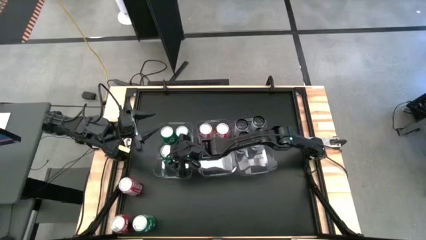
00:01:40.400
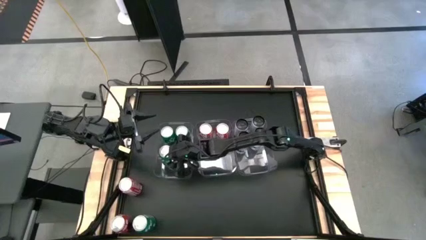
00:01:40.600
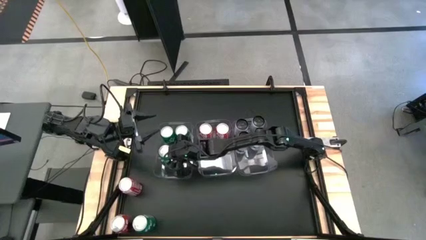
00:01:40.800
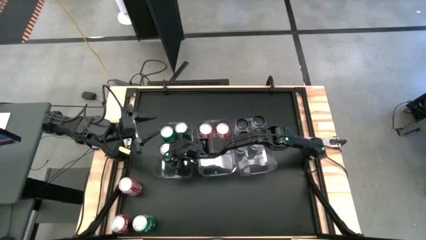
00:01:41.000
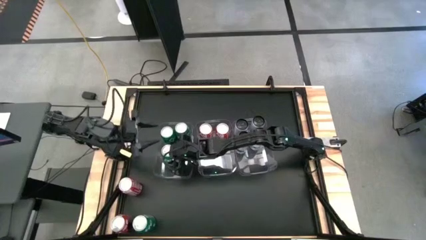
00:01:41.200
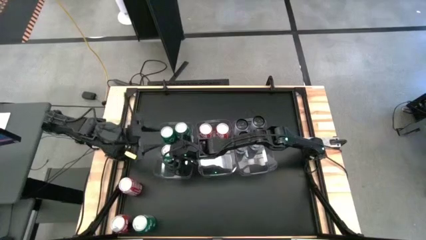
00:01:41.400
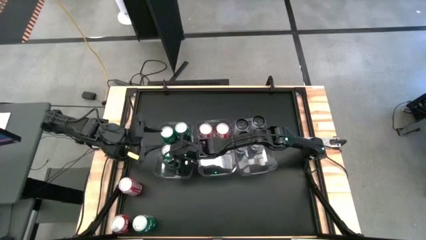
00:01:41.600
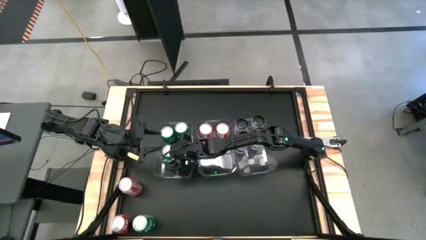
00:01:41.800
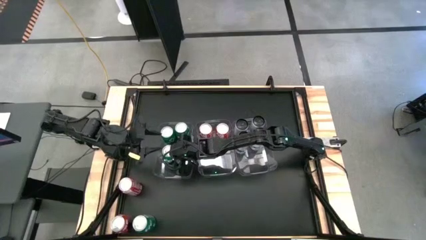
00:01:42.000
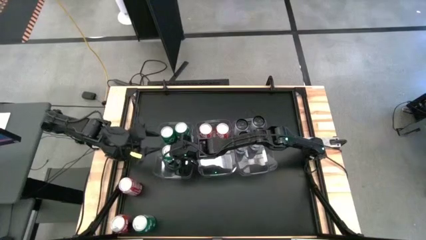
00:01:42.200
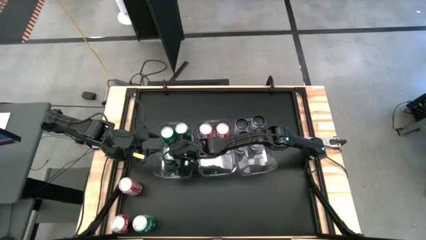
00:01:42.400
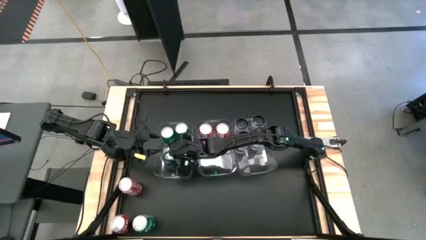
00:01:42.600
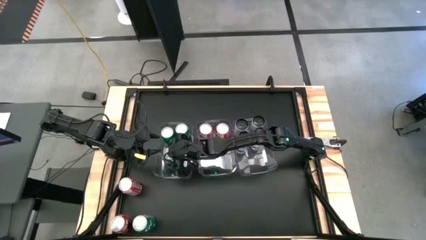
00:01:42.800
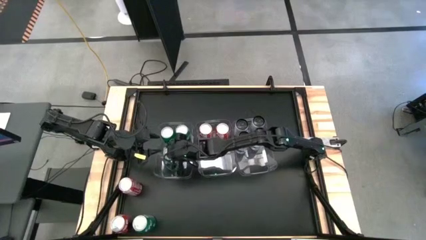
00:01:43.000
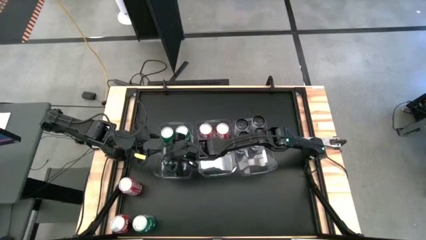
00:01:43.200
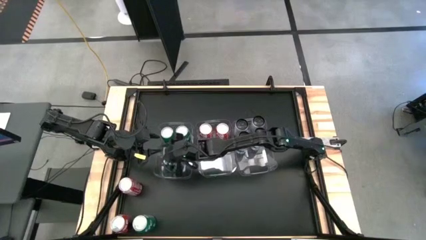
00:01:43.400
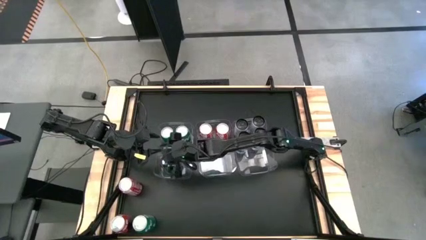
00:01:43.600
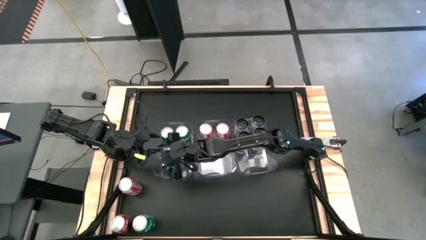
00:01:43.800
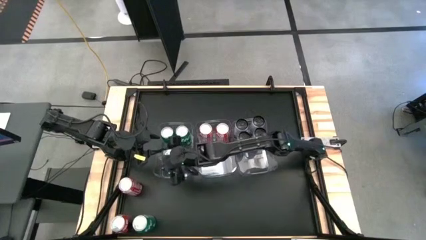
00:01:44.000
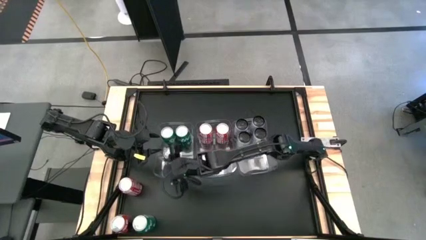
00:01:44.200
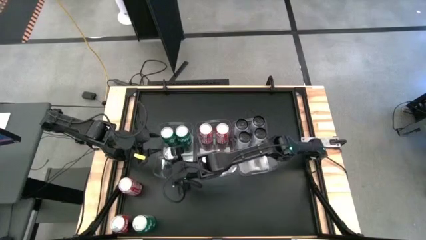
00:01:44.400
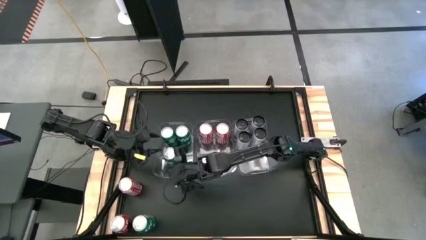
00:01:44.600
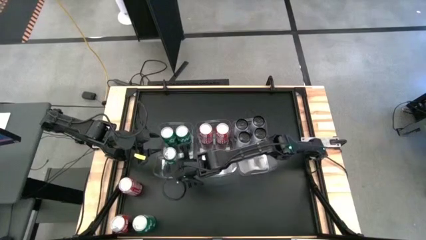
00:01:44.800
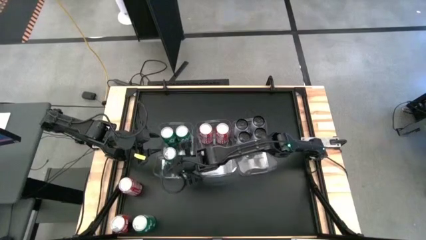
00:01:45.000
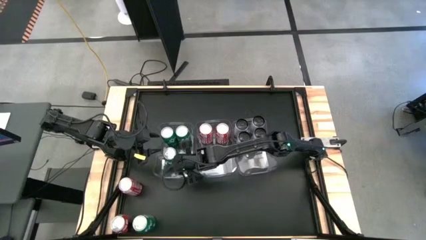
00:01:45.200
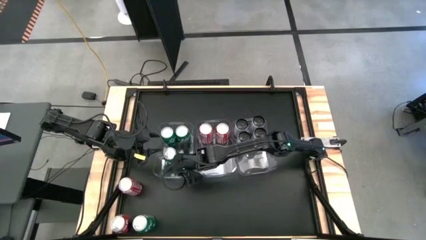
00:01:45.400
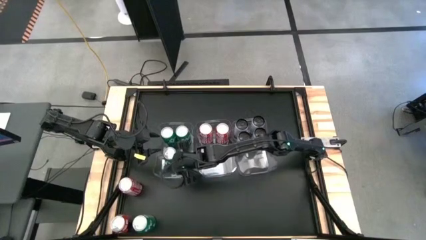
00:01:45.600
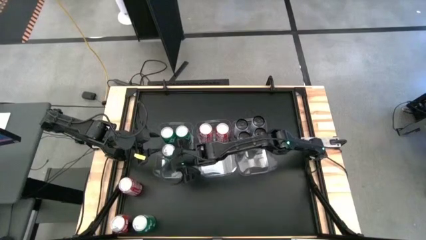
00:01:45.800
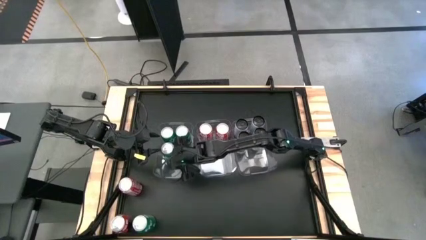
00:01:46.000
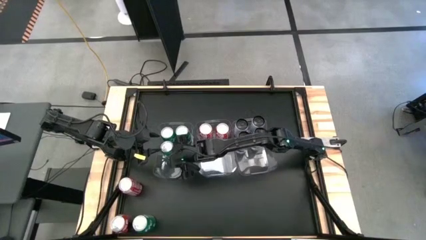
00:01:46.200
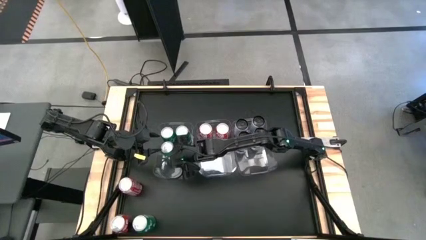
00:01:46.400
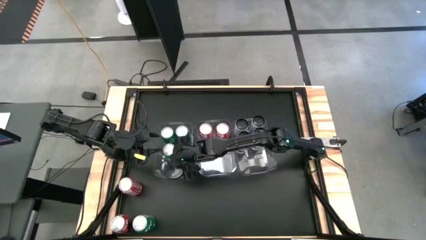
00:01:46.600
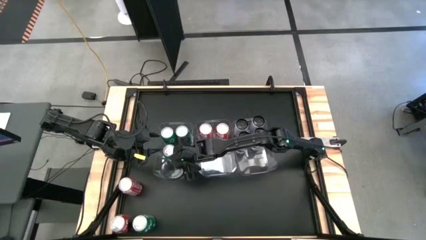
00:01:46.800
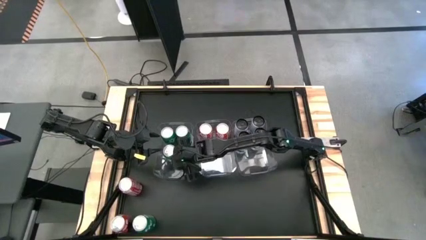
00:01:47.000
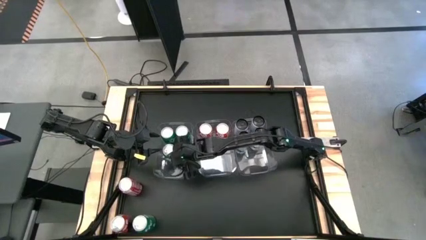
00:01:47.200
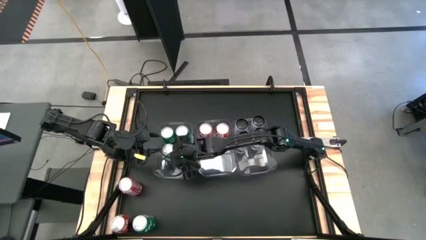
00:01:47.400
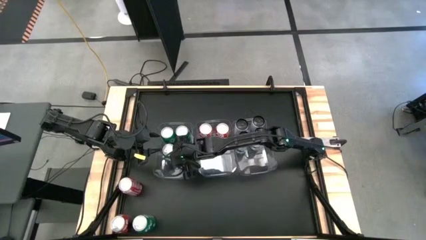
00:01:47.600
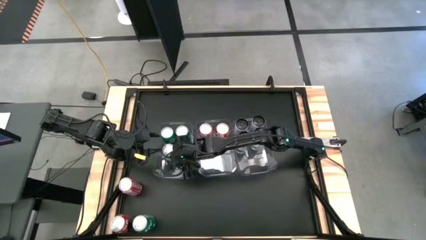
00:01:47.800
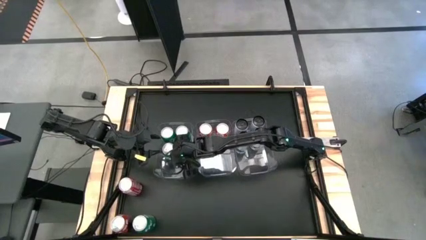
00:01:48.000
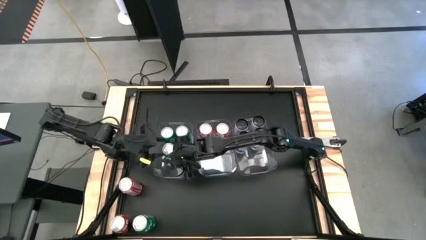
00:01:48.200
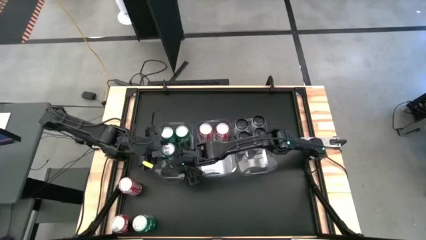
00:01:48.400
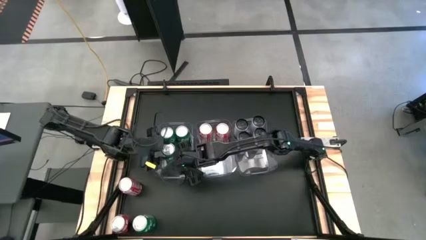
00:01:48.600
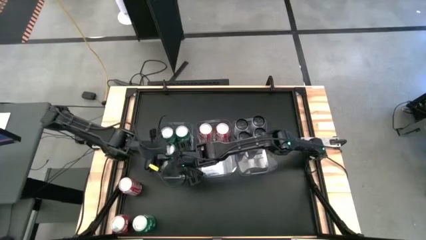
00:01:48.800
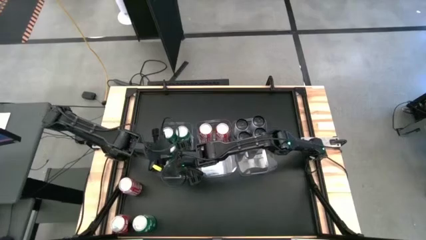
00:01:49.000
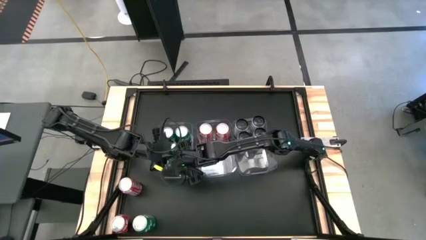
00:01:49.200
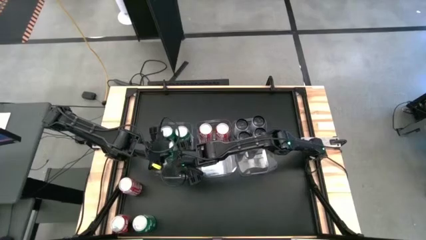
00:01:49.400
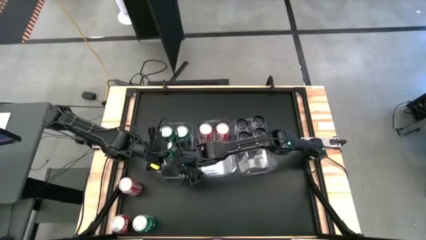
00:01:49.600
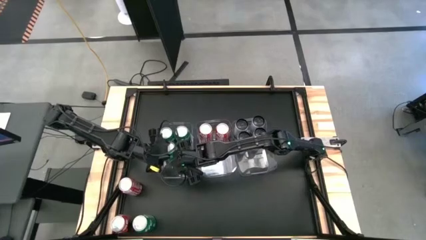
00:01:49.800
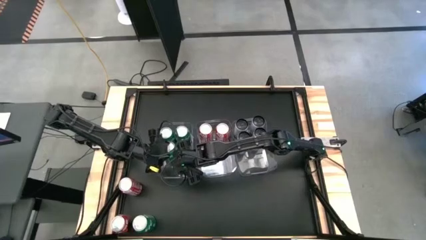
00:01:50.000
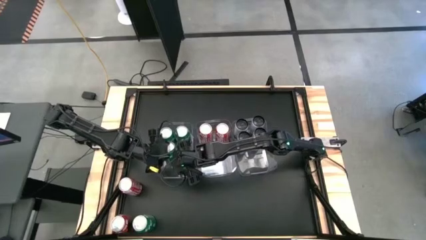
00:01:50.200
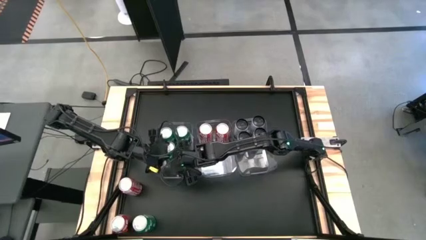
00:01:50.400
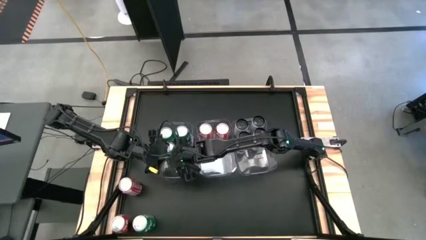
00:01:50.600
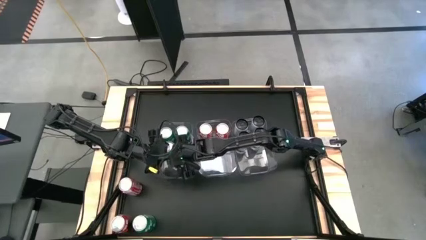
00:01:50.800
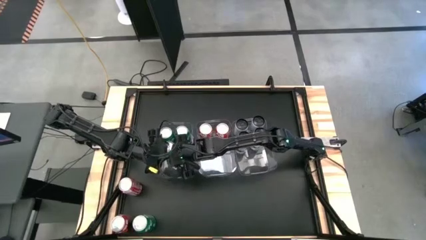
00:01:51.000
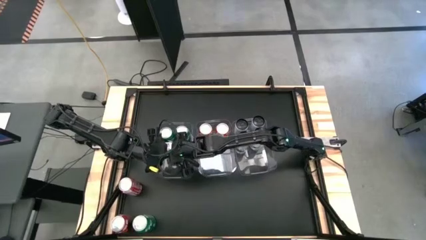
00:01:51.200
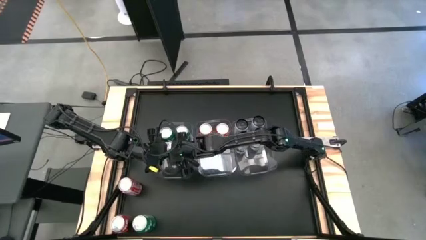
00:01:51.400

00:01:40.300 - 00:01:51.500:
Task: Sort soda cans
Put the top green soda can into the left transparent bin
